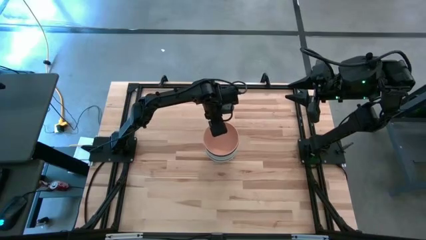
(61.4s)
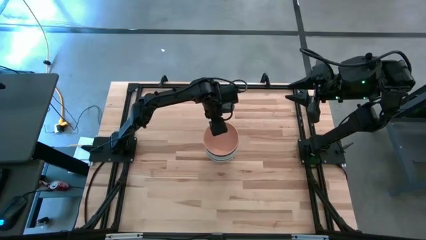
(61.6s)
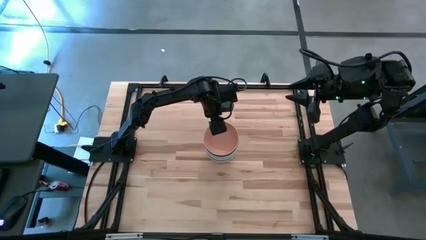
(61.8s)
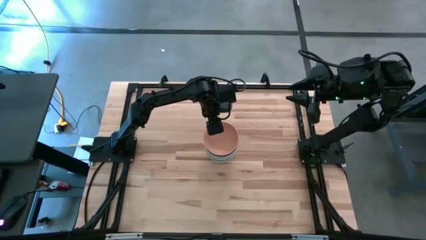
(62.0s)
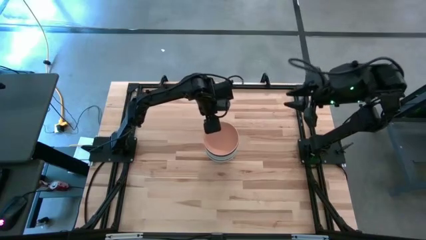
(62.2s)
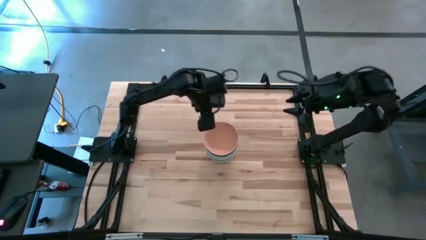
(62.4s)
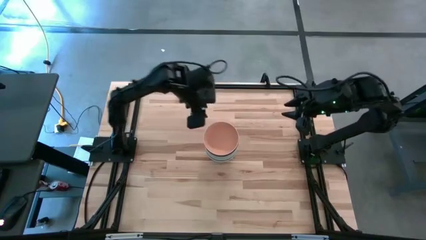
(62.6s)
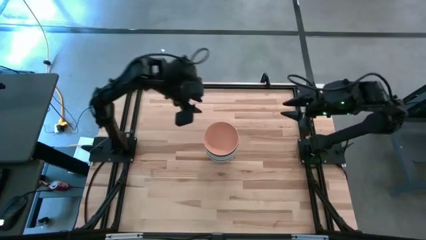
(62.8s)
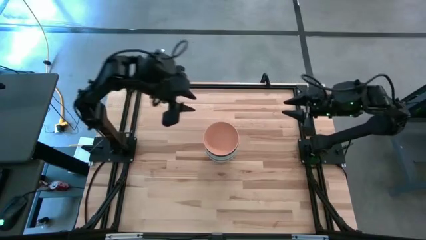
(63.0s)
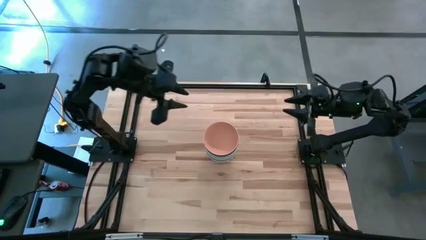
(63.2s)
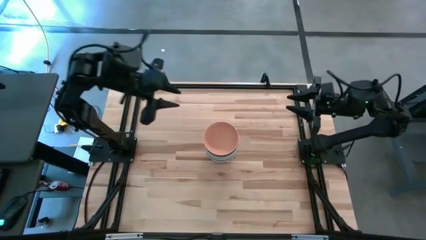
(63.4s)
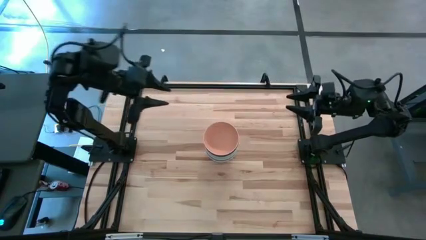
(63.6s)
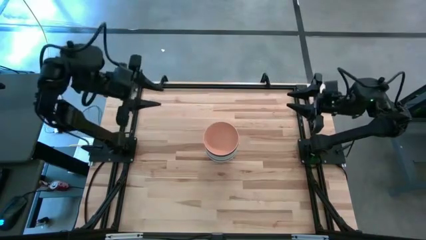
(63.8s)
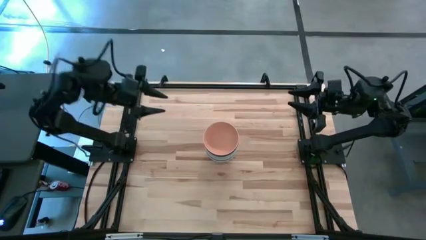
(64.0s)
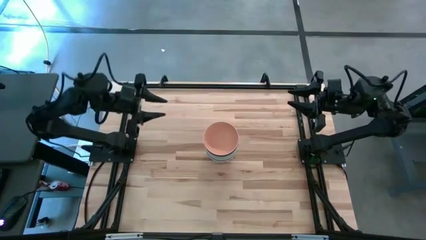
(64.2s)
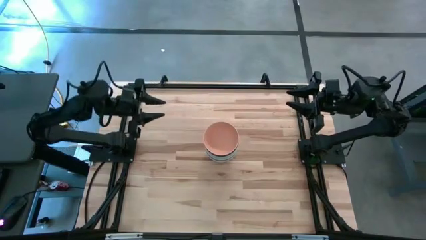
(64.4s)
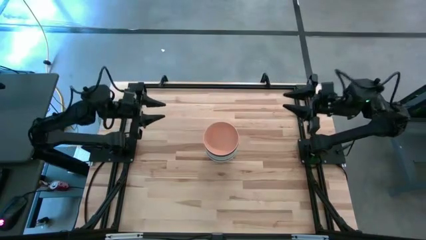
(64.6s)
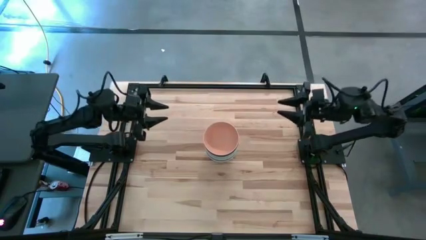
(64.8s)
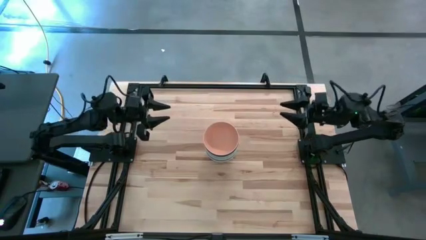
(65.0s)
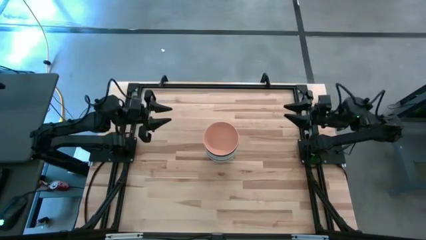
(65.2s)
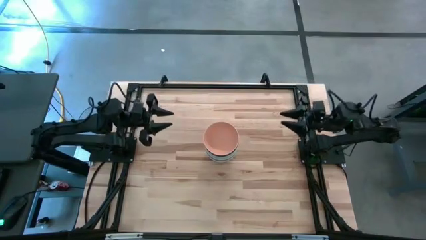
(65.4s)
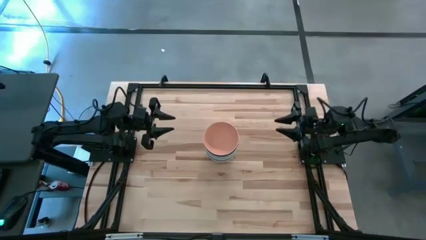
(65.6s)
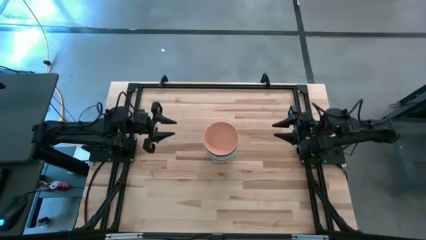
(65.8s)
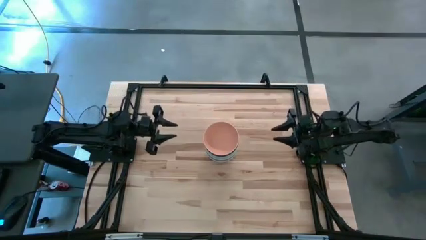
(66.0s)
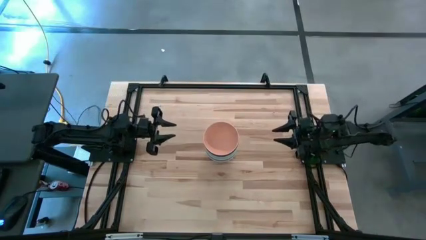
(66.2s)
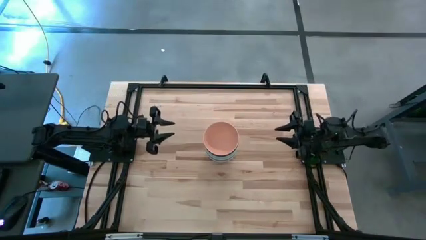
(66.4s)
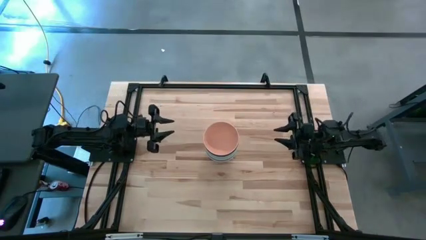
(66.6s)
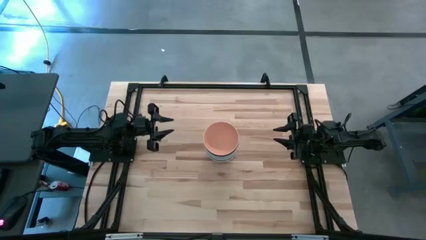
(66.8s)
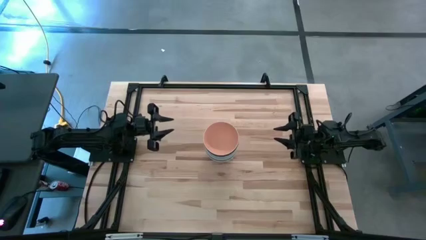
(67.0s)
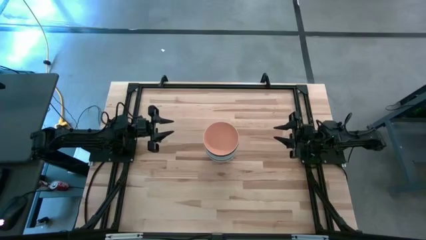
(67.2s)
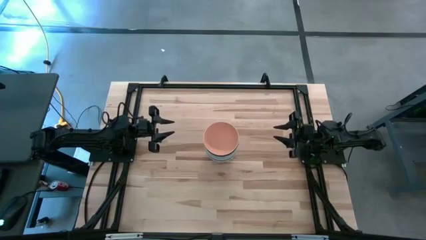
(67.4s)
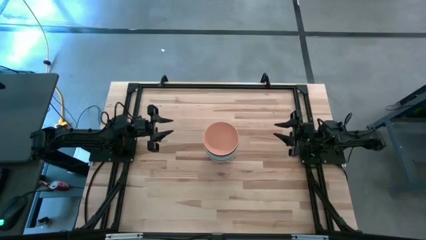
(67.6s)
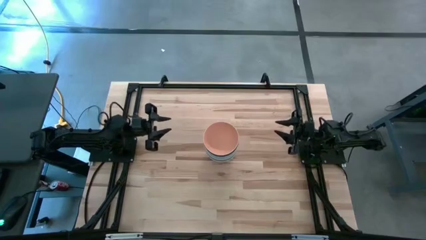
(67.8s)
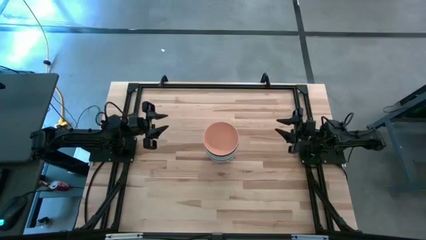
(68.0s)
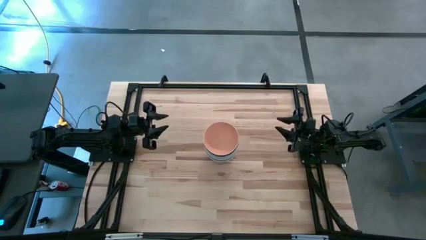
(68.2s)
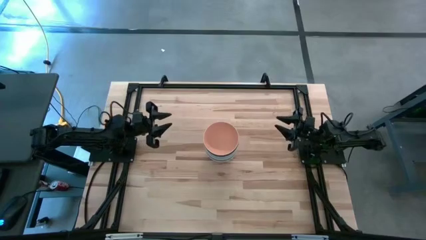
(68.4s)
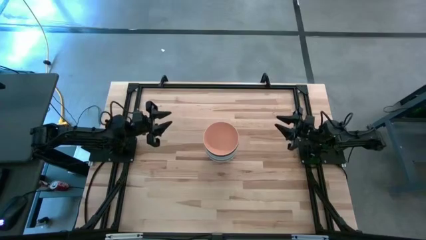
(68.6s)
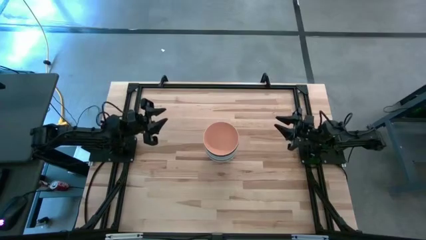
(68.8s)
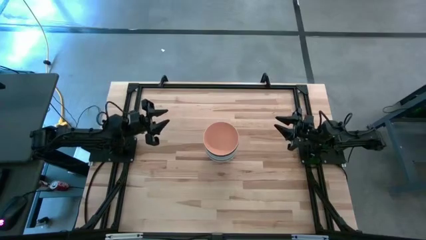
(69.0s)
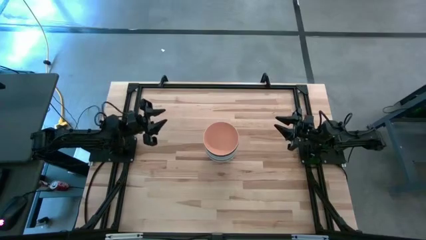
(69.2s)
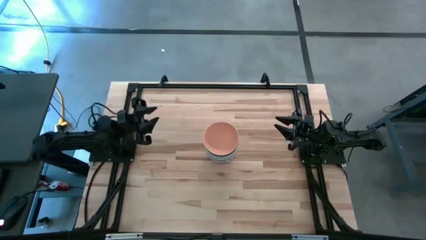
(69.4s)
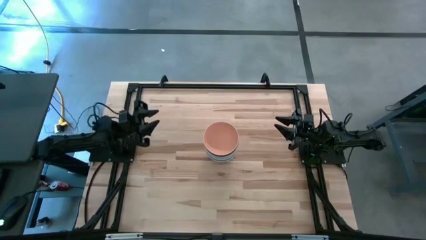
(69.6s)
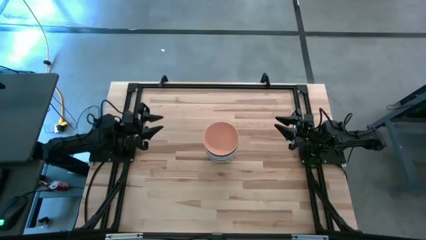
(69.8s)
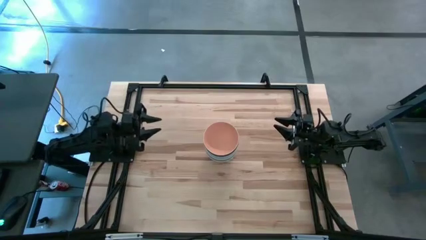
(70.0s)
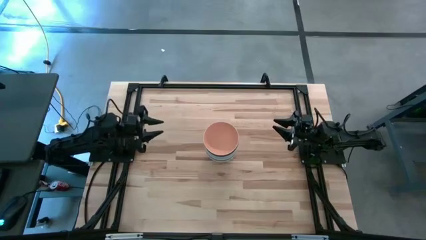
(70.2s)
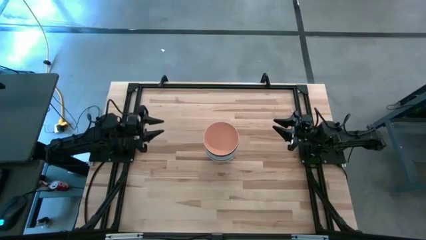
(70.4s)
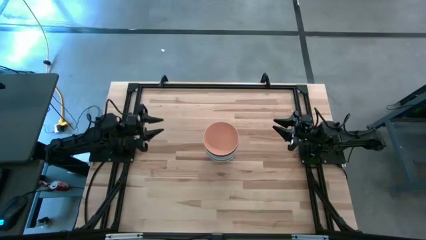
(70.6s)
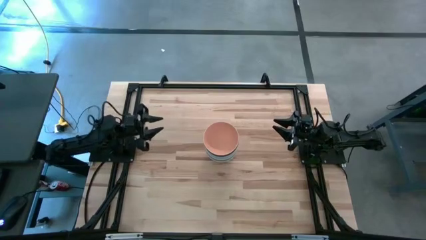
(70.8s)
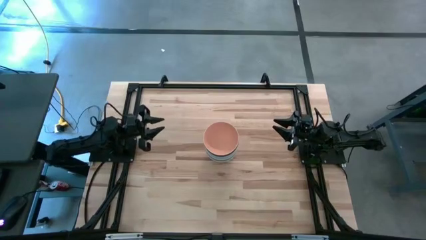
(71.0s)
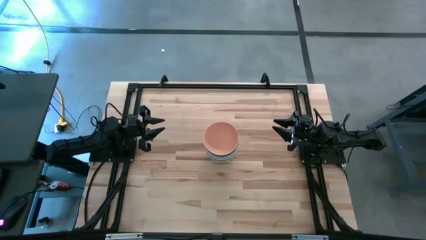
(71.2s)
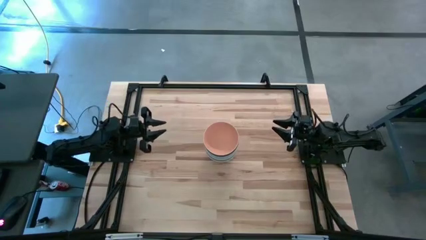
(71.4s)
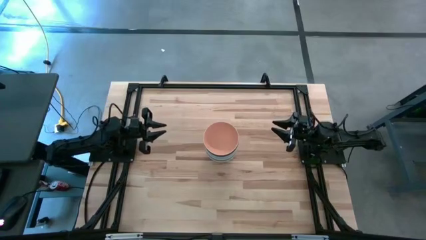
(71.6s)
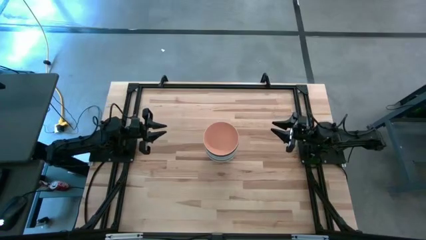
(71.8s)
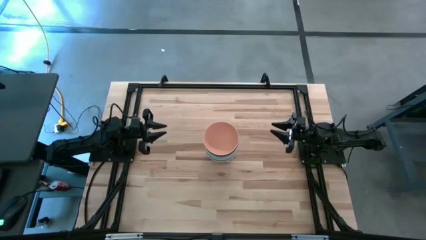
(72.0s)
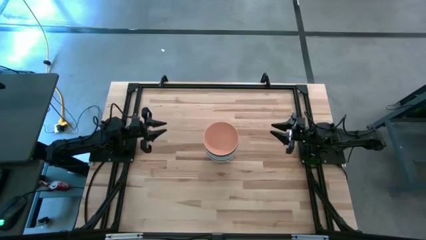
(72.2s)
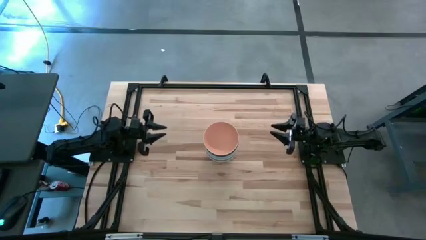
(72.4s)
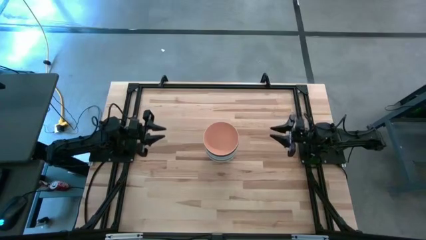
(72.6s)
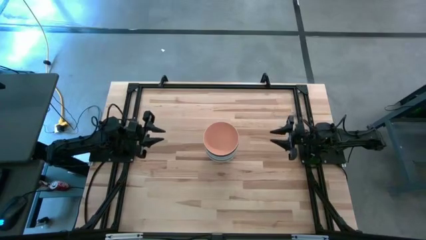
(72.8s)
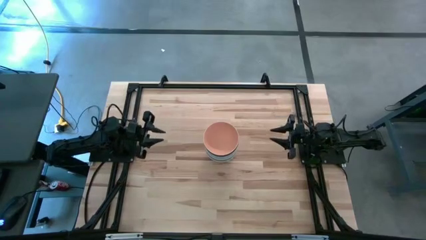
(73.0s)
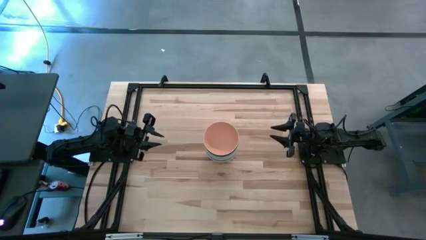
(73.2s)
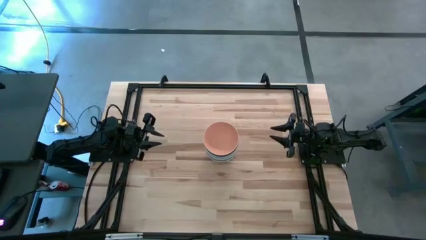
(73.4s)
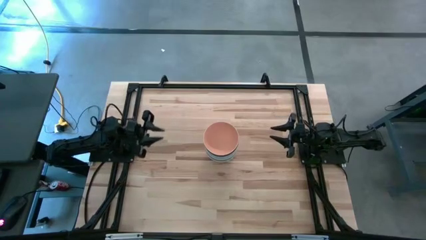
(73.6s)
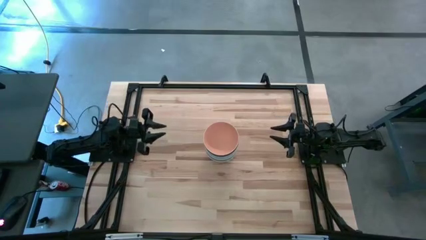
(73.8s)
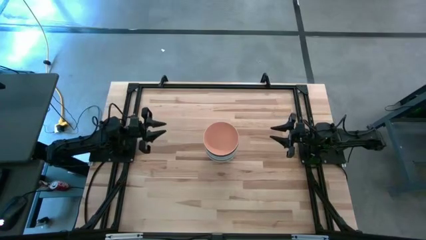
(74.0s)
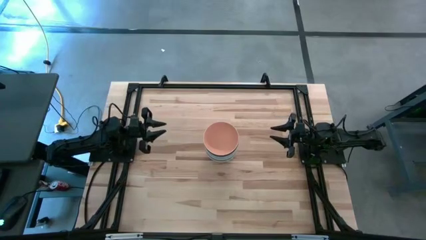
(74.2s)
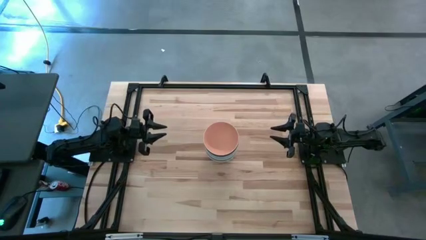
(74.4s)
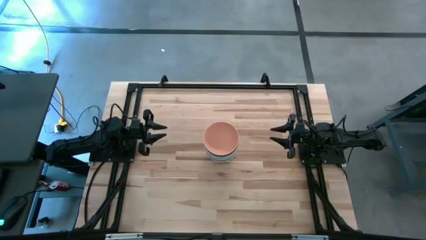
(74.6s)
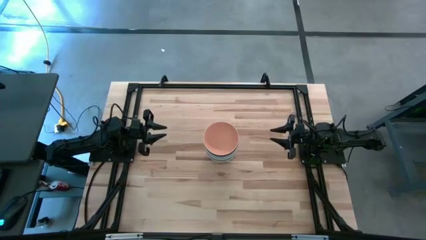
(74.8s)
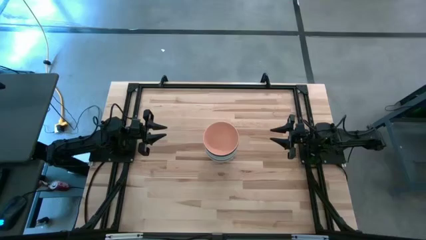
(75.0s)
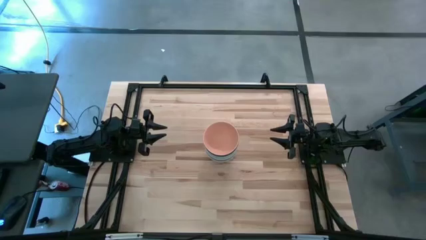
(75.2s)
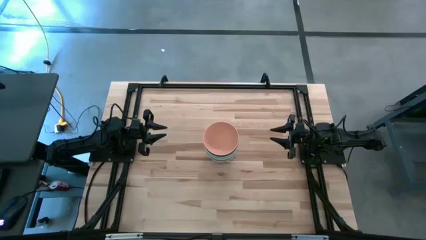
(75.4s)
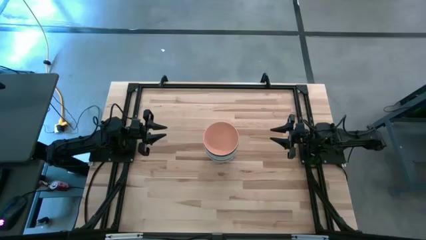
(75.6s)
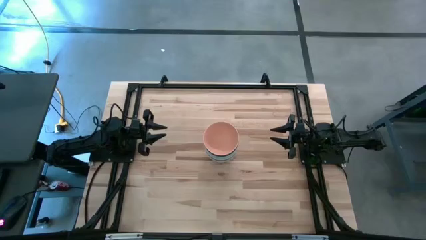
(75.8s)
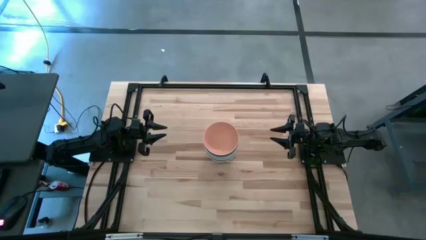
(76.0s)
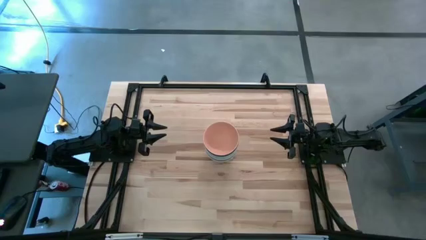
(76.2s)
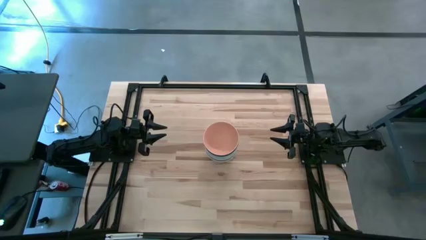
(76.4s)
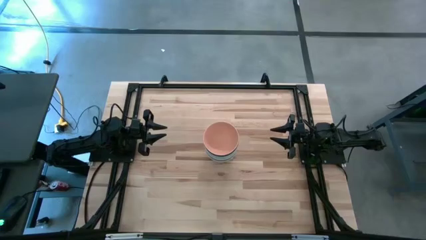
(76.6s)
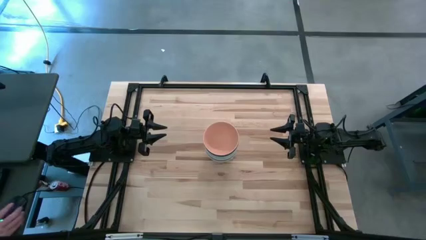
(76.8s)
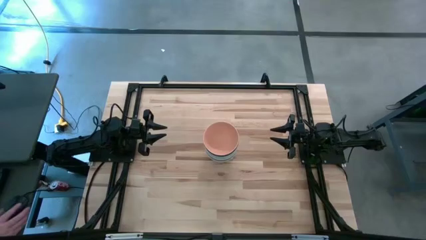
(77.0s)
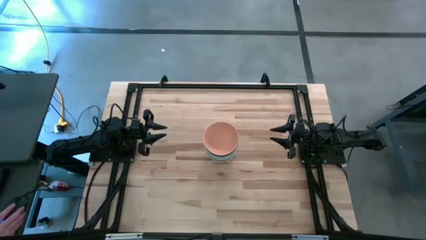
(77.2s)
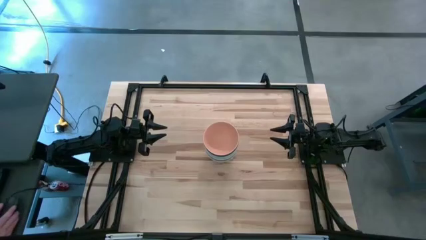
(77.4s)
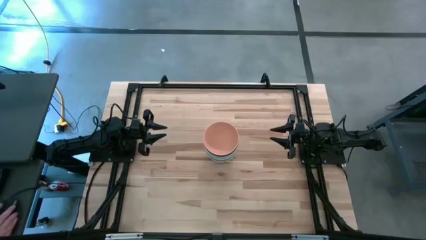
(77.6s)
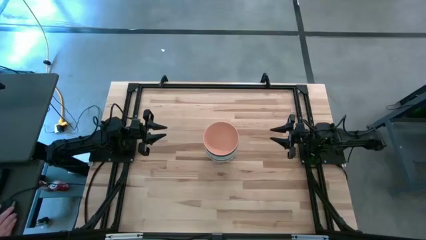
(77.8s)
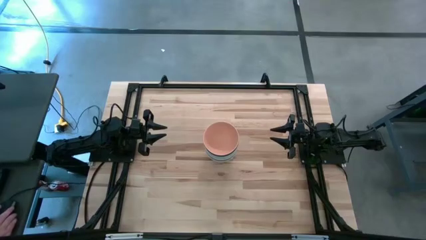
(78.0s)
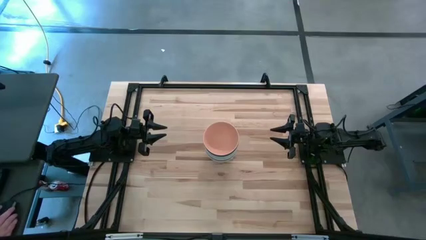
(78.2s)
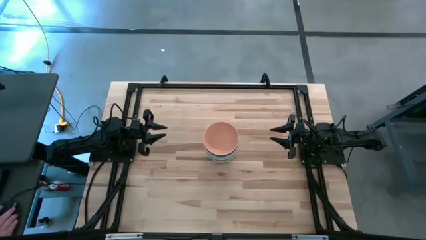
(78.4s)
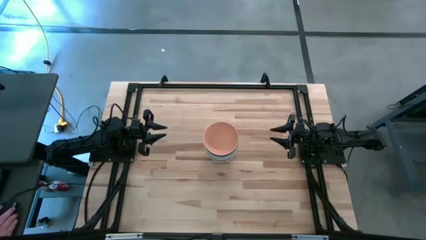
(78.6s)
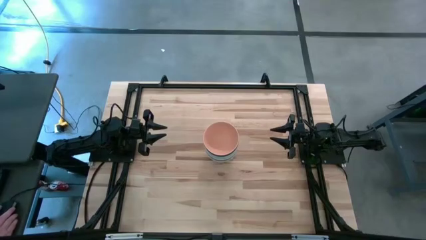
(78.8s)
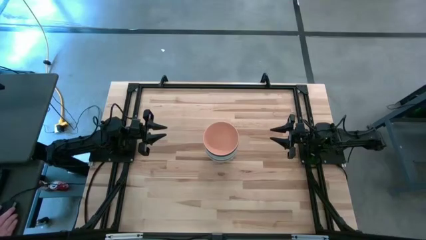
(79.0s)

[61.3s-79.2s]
Task: Nest bowls inside each other
Return to Home Position
